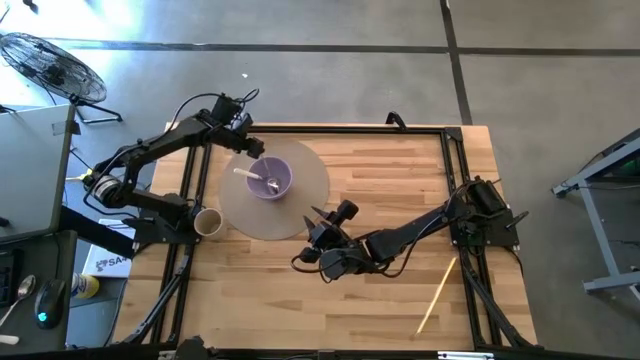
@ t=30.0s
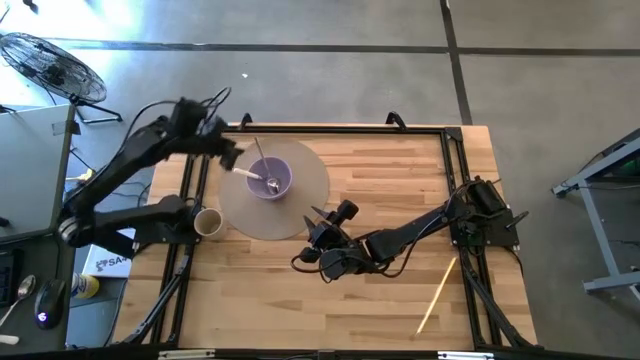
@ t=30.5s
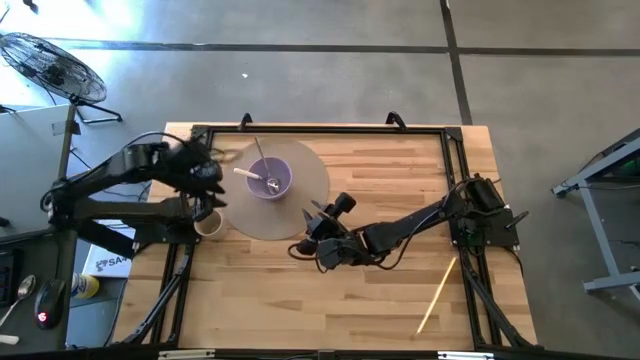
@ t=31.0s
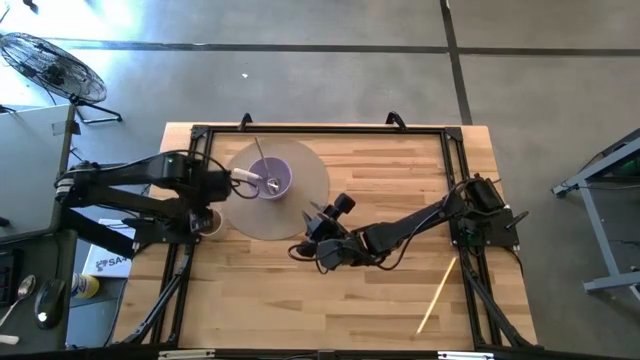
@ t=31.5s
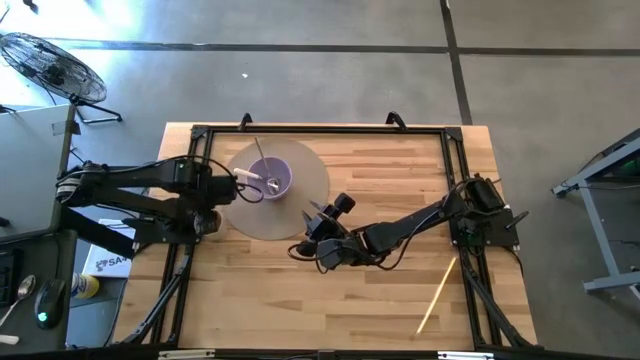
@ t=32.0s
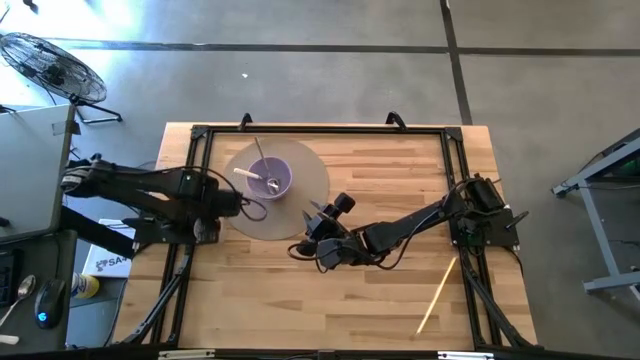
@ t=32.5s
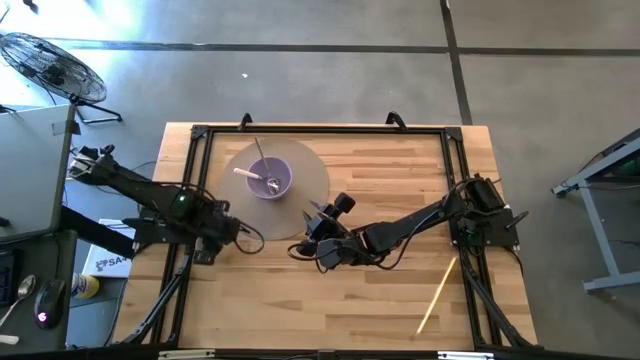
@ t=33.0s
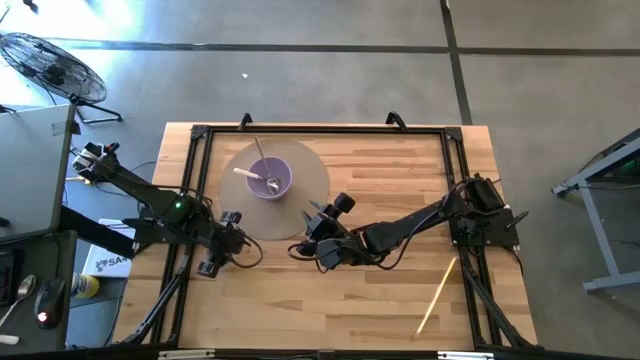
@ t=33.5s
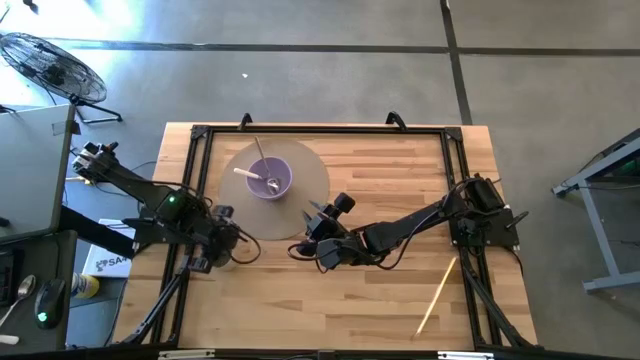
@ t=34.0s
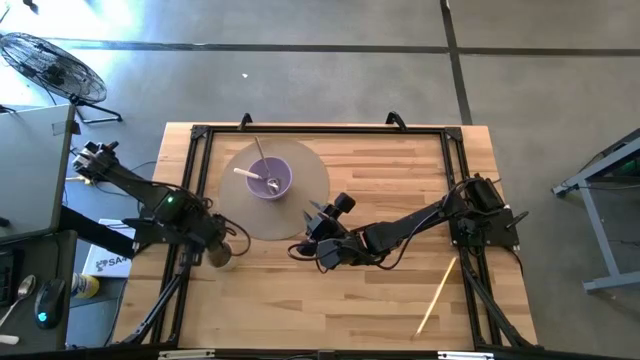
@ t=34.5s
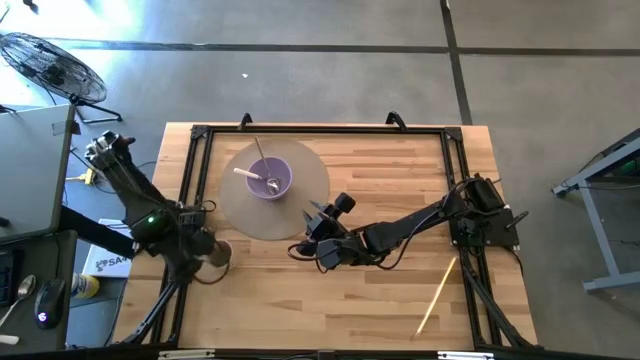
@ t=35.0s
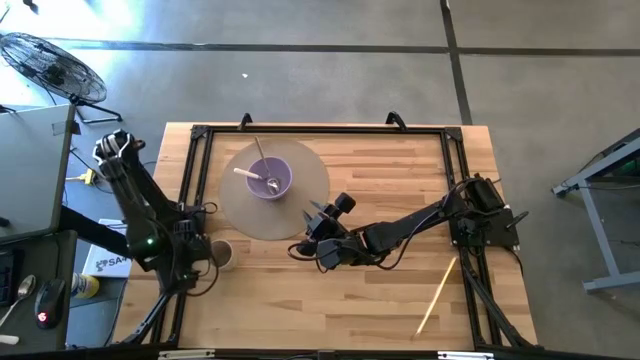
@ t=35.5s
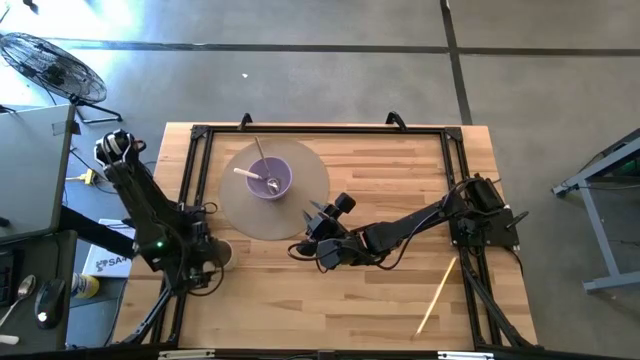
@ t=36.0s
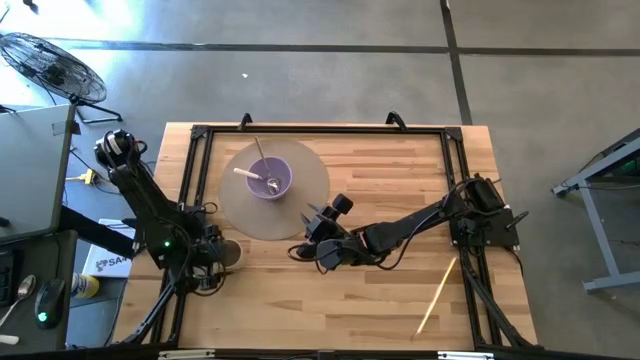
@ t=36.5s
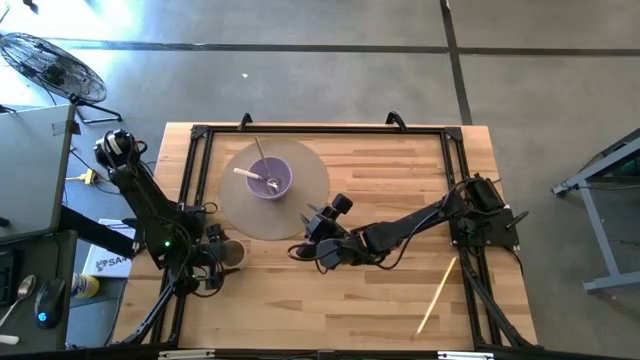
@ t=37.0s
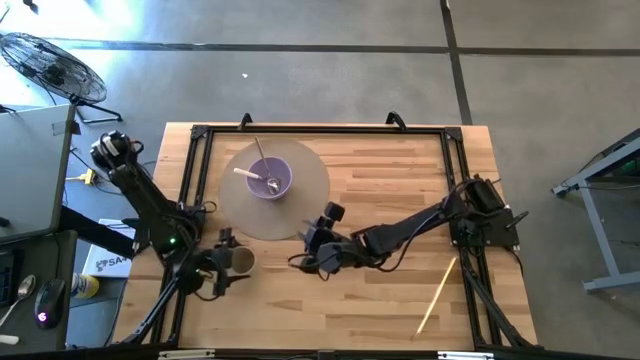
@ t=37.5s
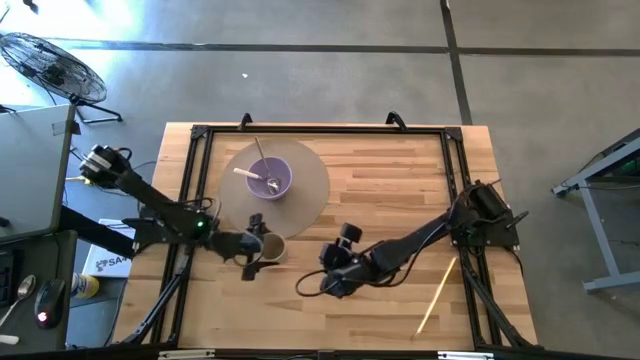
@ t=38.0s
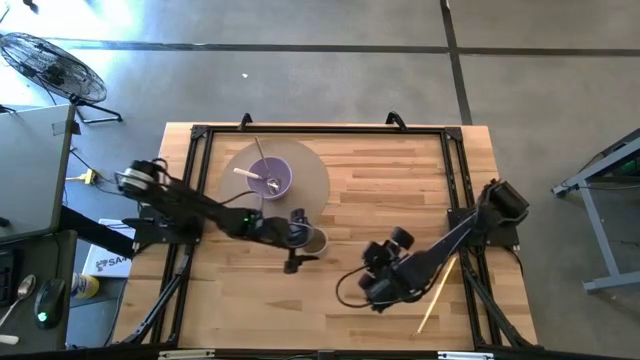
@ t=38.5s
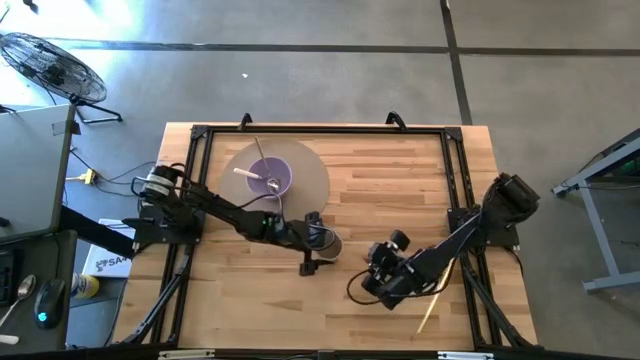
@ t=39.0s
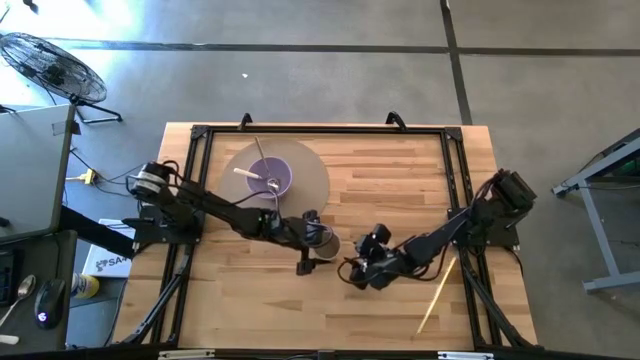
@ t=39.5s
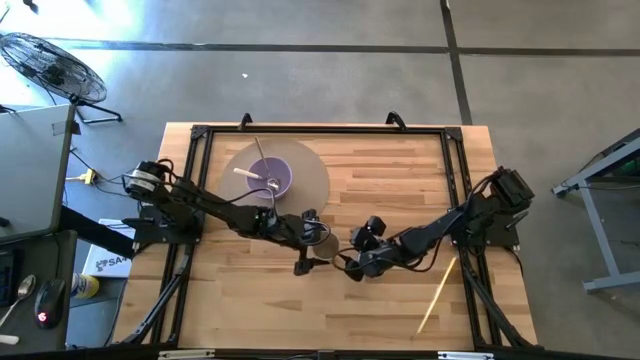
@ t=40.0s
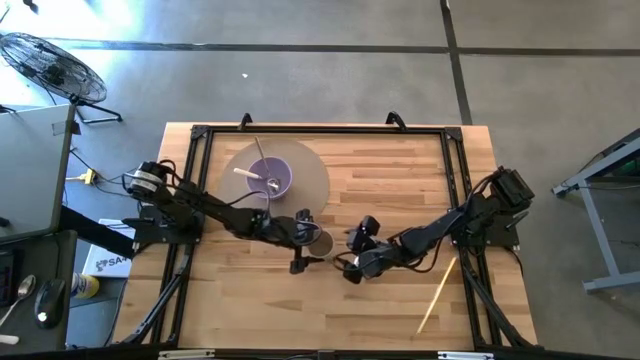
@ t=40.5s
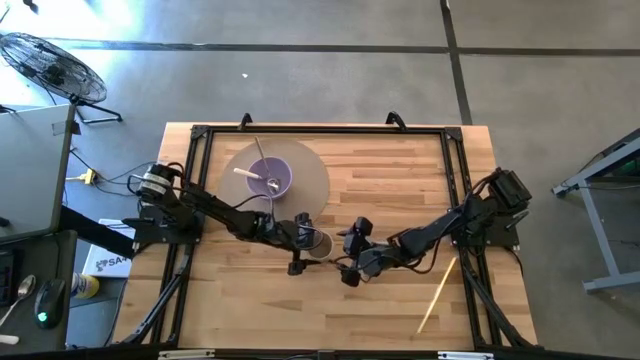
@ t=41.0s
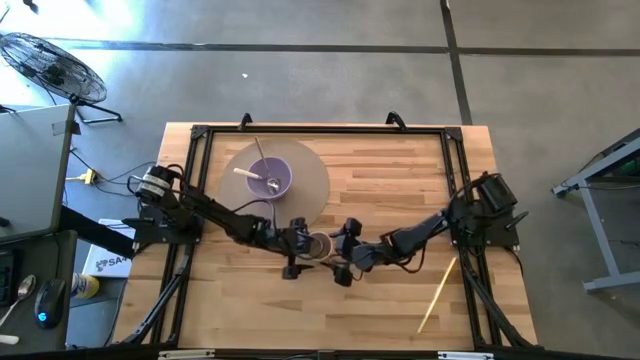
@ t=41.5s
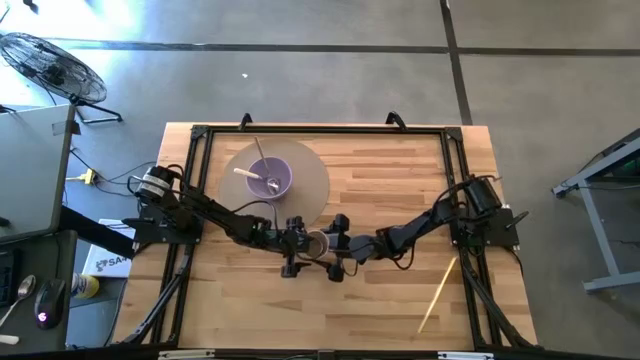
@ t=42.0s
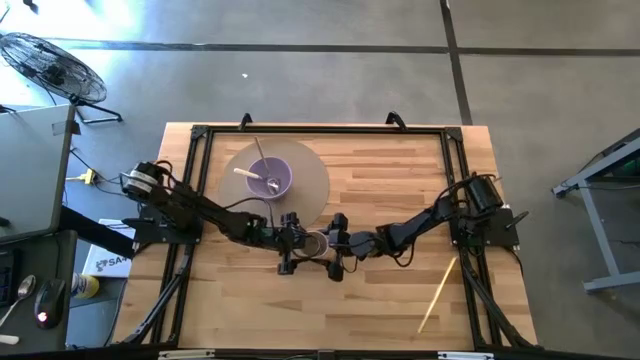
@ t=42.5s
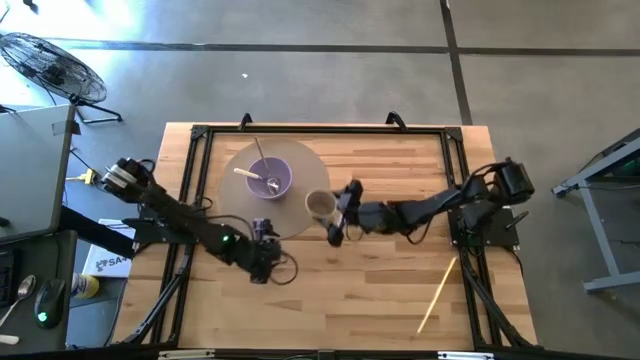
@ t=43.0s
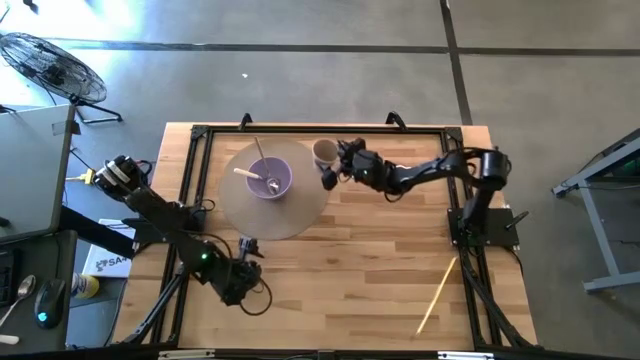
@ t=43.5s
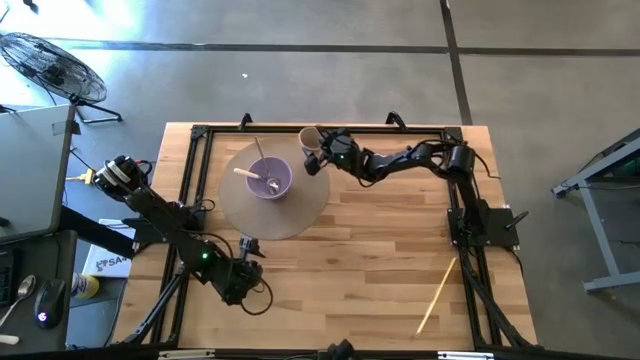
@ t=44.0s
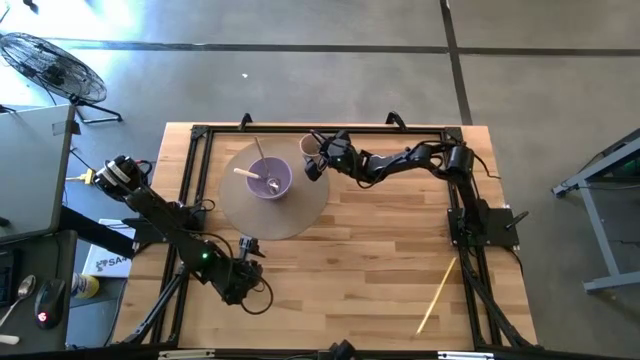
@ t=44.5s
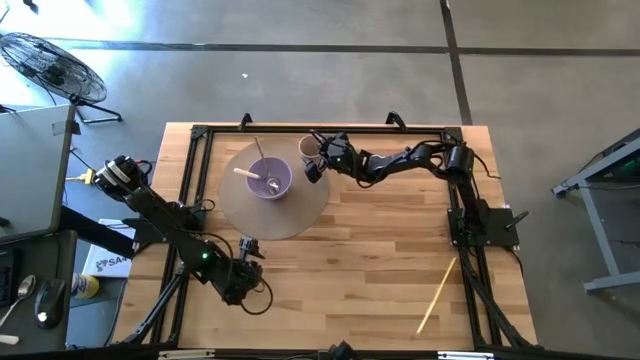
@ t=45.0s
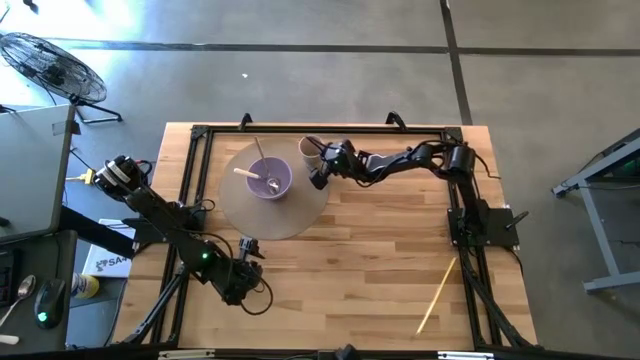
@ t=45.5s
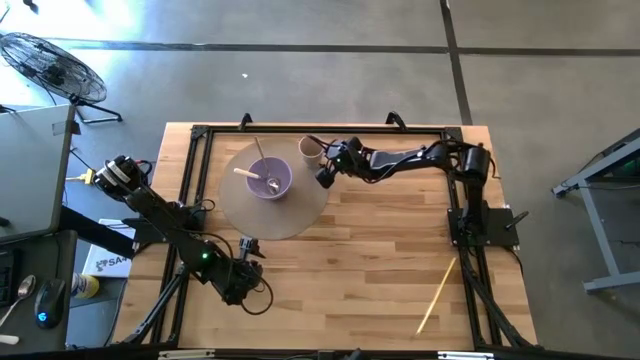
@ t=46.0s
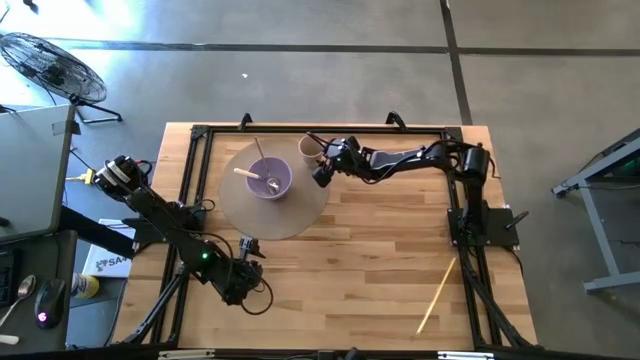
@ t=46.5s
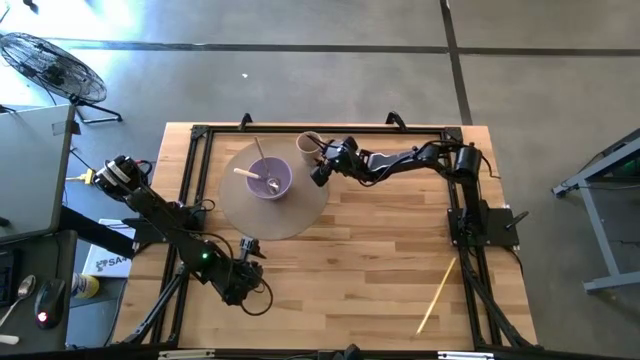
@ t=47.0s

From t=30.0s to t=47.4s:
Task: Pick & Place Utensil
Put the white cup on the top right side of the gray placemat

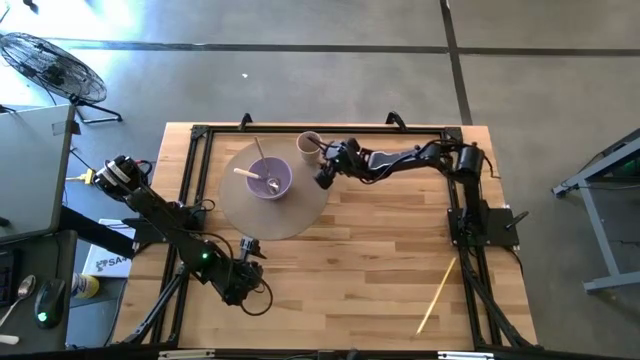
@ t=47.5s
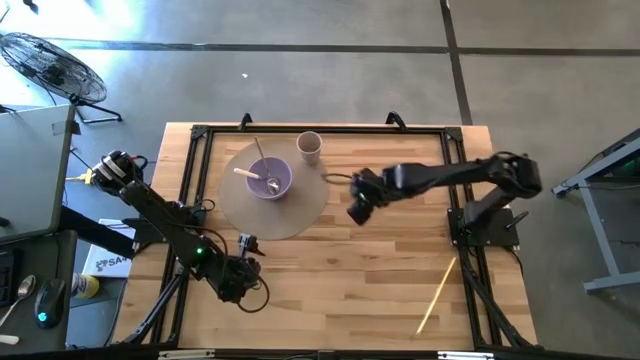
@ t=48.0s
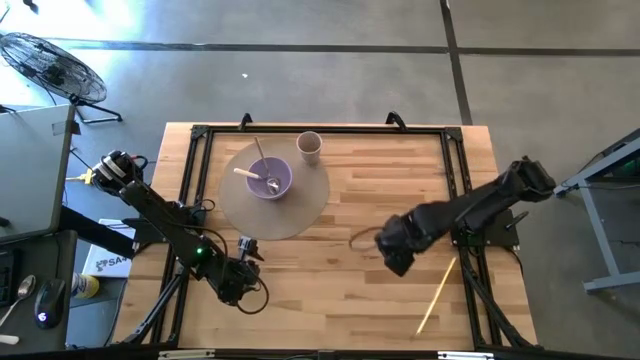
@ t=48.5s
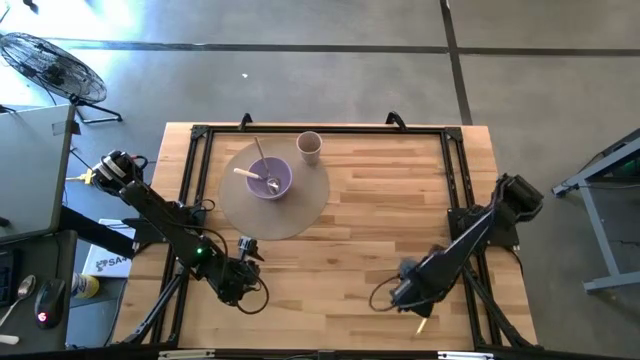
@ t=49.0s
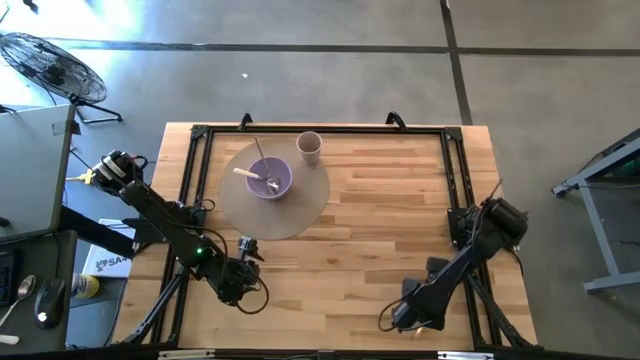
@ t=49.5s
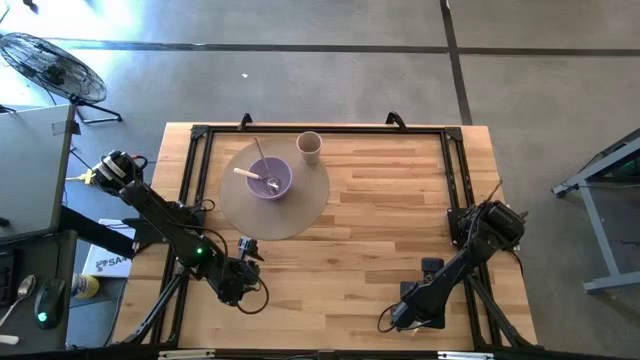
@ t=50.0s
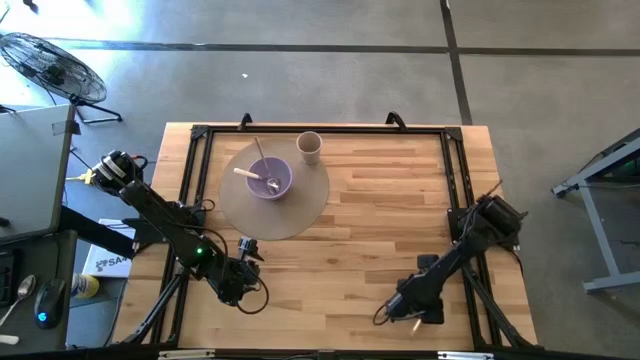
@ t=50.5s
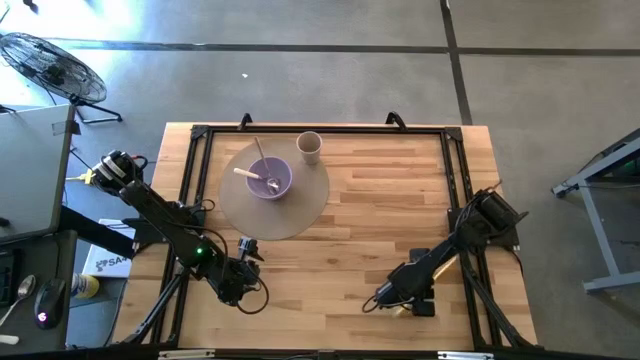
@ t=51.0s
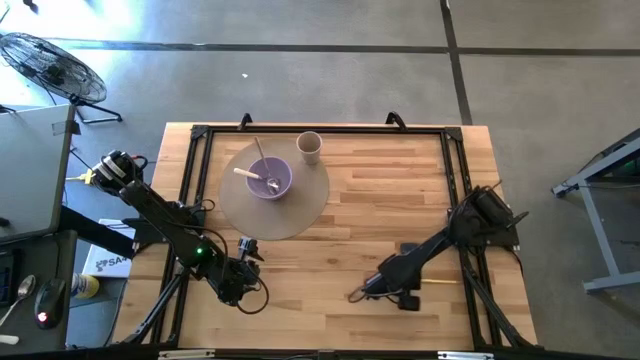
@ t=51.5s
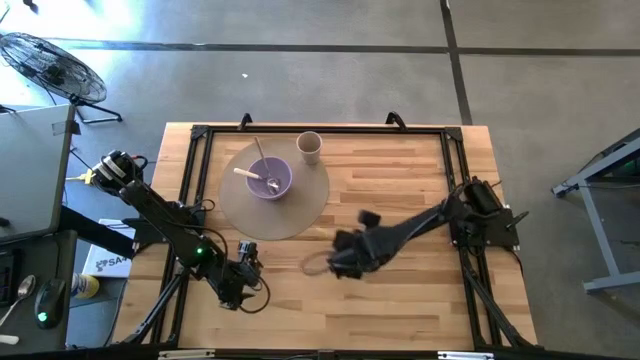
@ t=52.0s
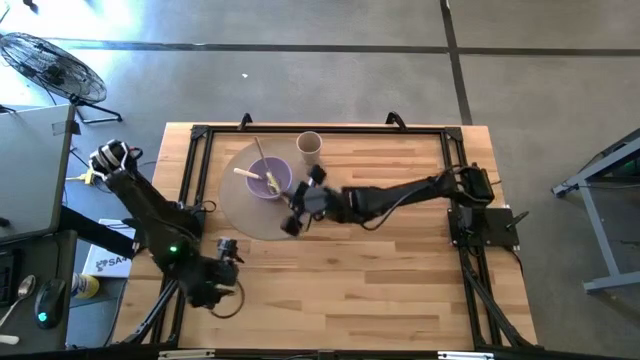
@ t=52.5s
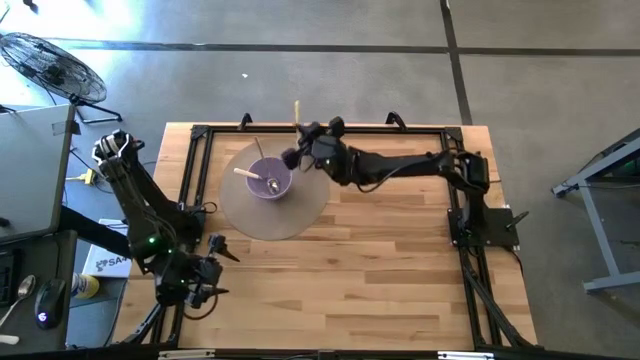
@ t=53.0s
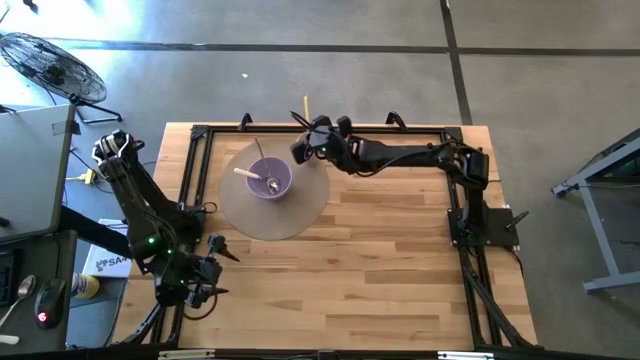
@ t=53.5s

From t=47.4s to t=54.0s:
Put the yellow straw into the white cup on the gray placemat
